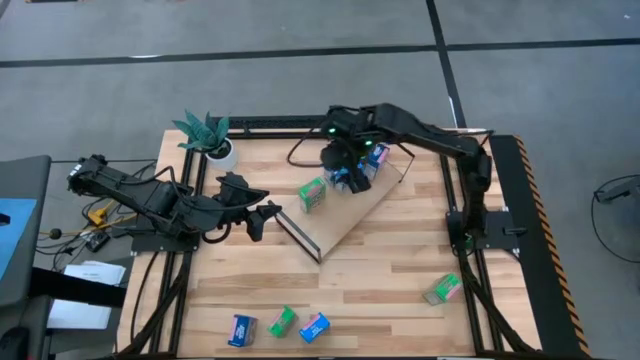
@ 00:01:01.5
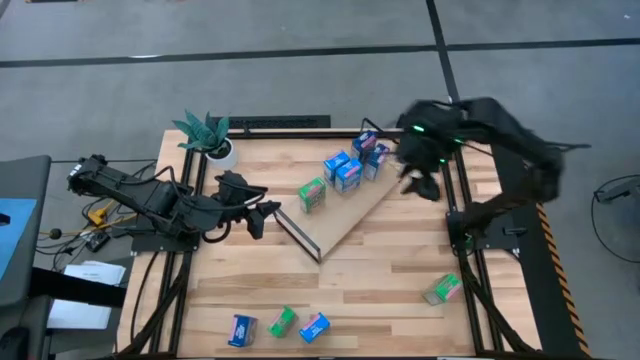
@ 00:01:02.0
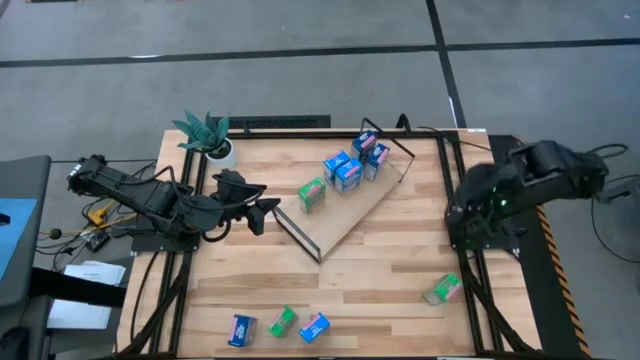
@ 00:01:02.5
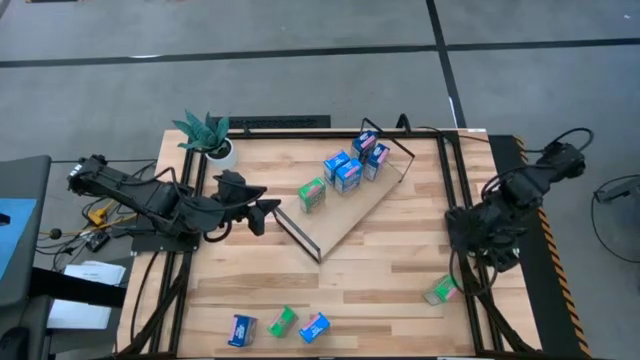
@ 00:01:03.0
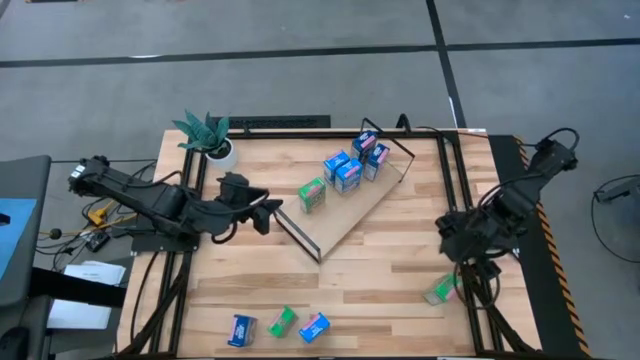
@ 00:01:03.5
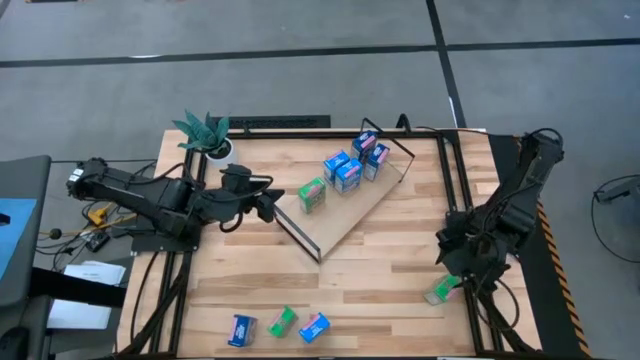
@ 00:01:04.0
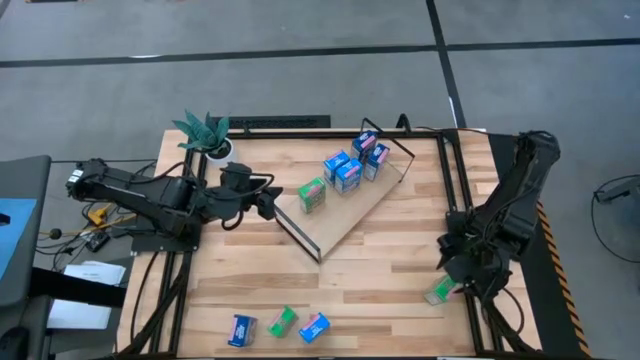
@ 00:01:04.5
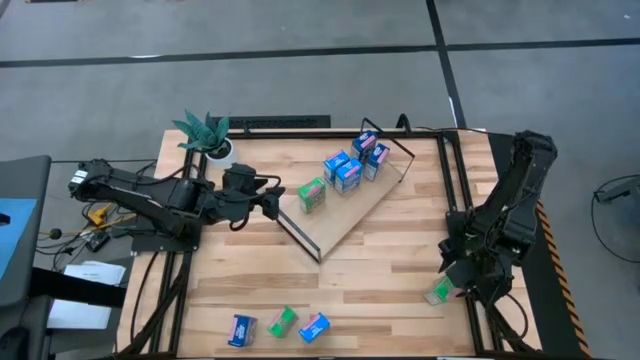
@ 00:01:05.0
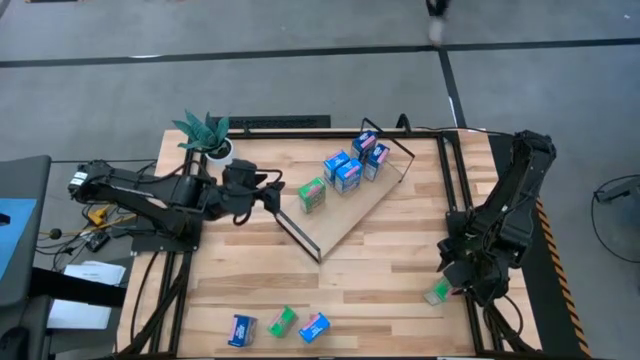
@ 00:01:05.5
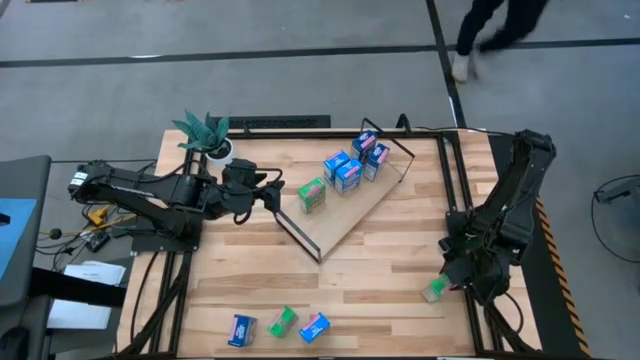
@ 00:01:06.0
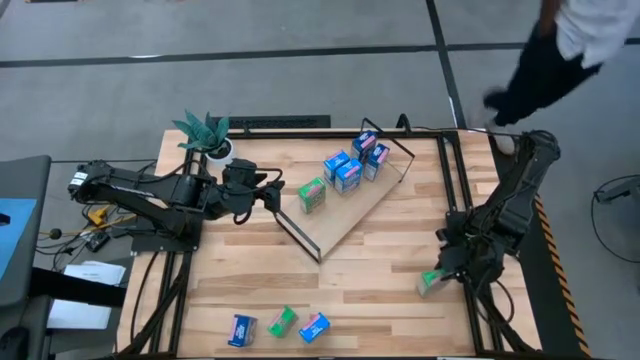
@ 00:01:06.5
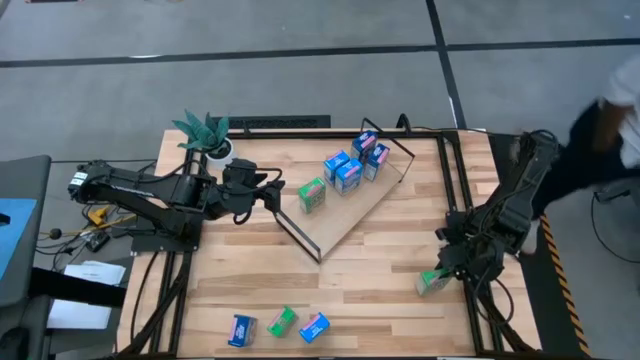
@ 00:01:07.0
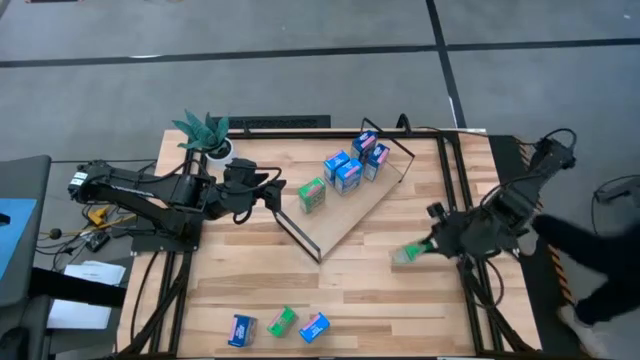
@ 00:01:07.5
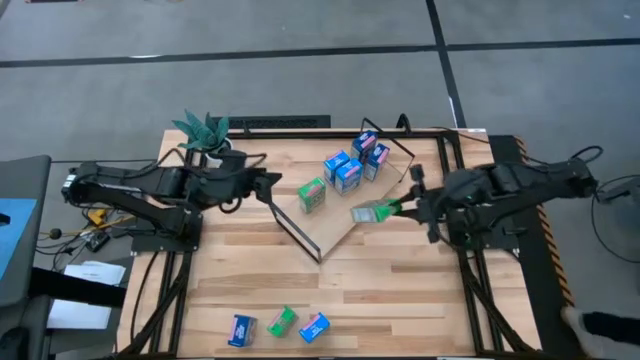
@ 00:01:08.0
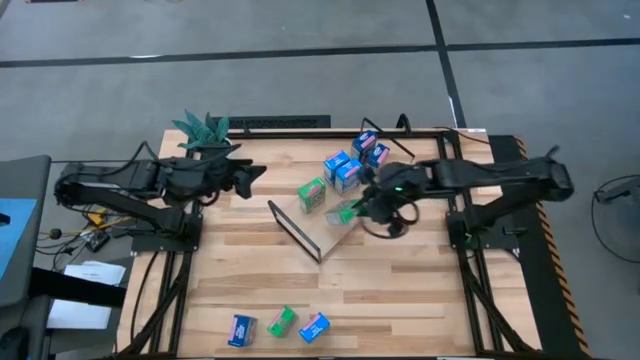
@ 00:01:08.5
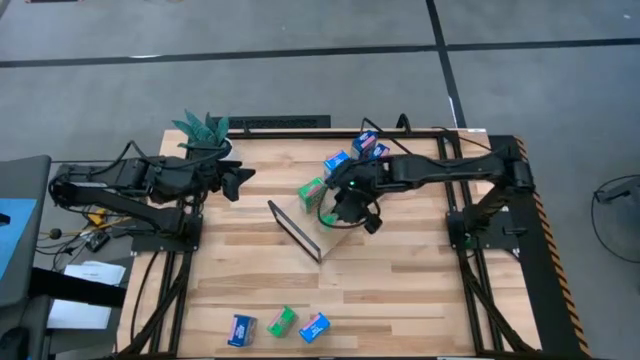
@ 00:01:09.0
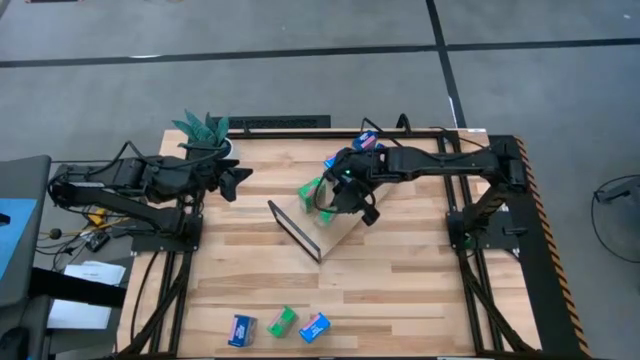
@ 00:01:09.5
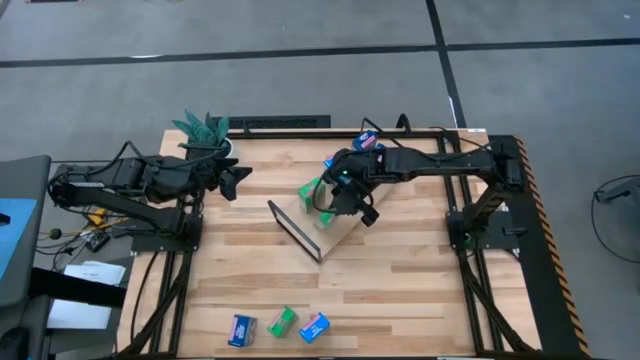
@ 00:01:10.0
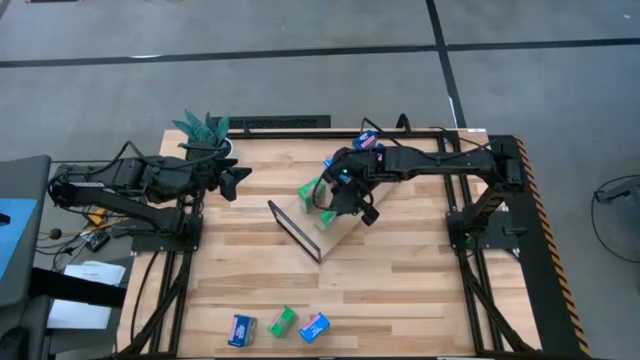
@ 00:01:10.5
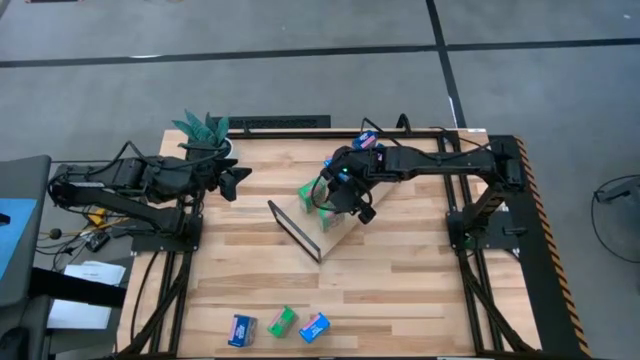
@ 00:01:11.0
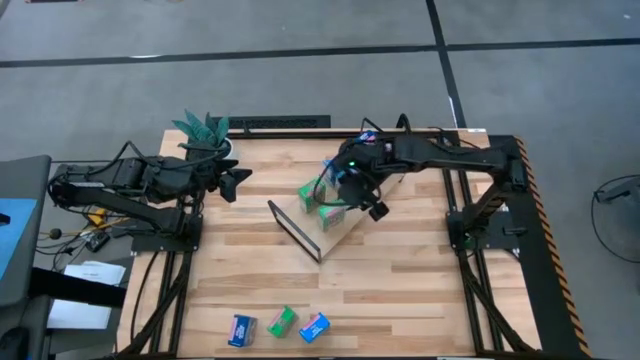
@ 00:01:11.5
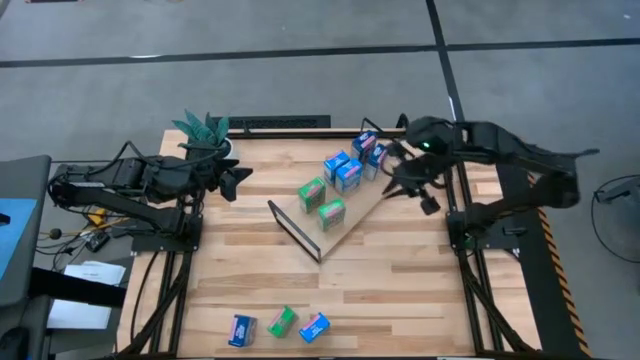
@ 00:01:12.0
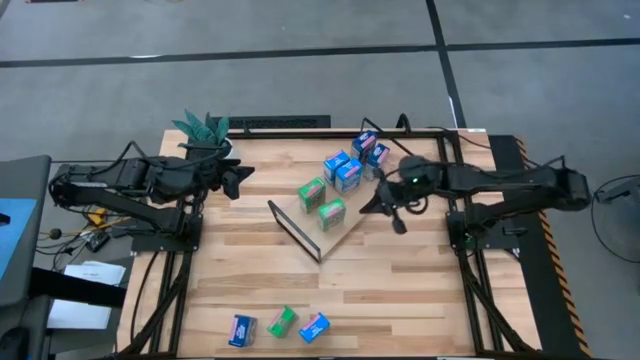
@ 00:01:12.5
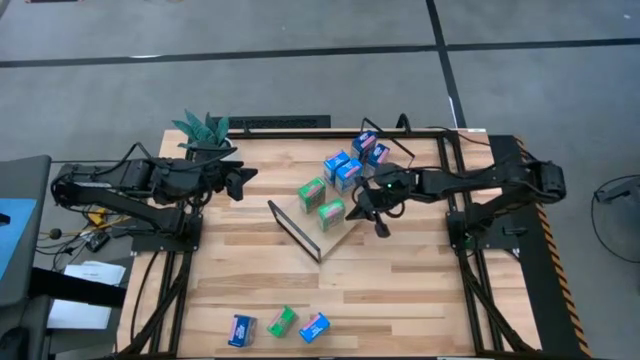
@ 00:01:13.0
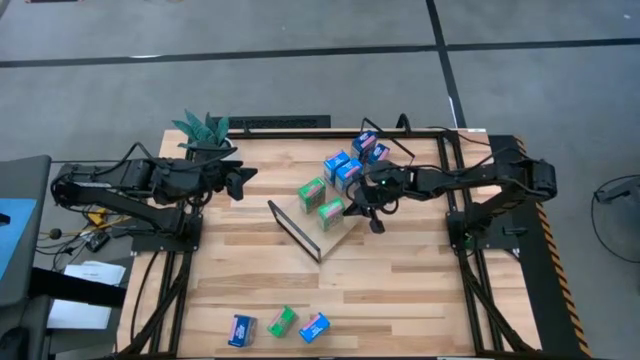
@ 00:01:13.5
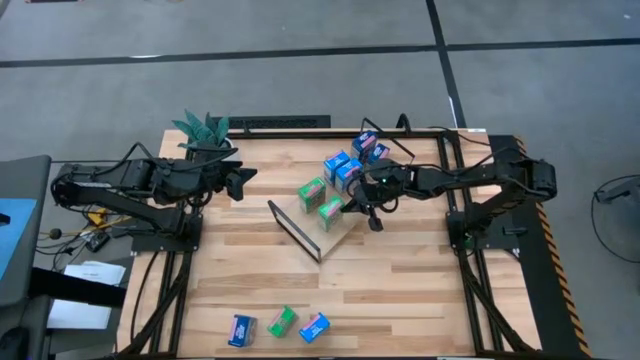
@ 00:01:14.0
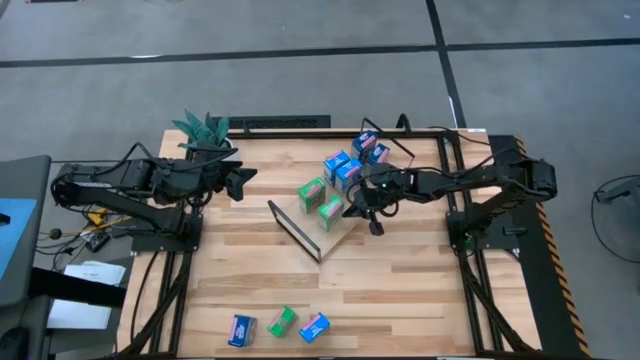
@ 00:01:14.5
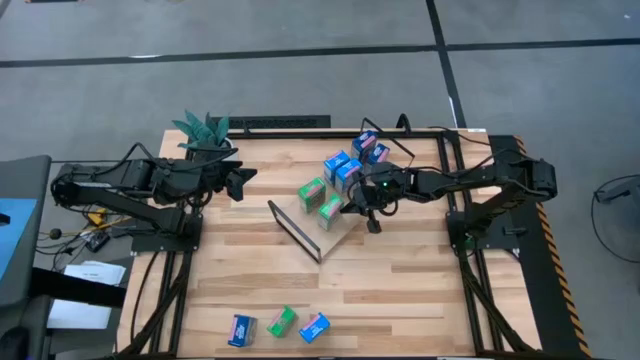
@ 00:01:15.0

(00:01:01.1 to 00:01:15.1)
Task: Stack cereal on shelf
Put the right green cereal box on the shelf aligned with the green cereal box

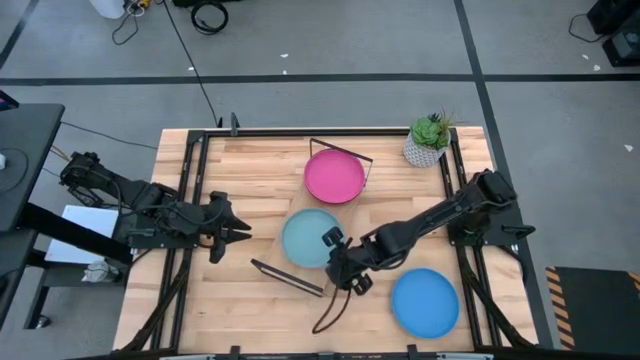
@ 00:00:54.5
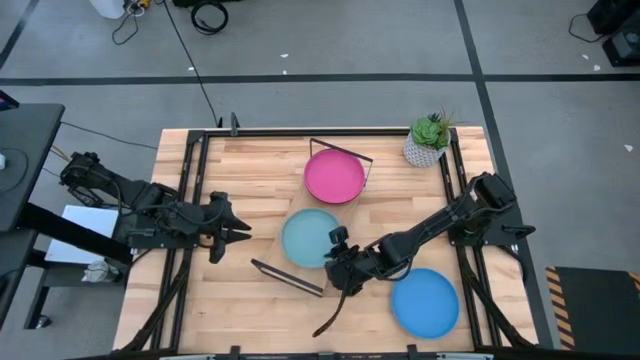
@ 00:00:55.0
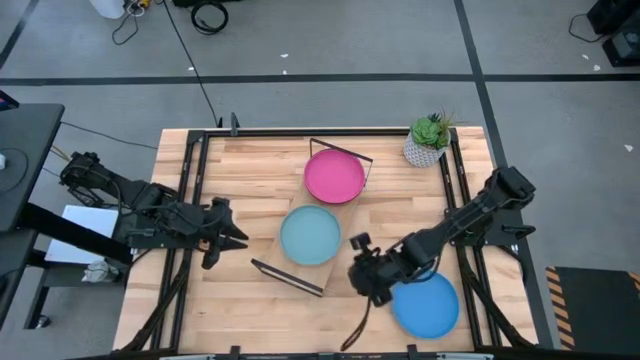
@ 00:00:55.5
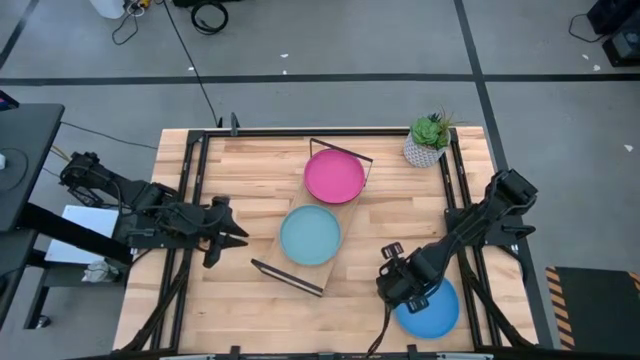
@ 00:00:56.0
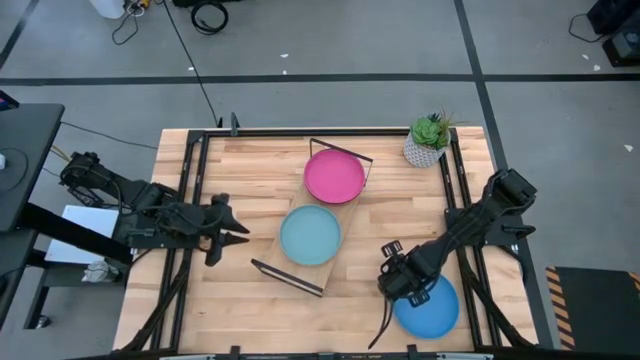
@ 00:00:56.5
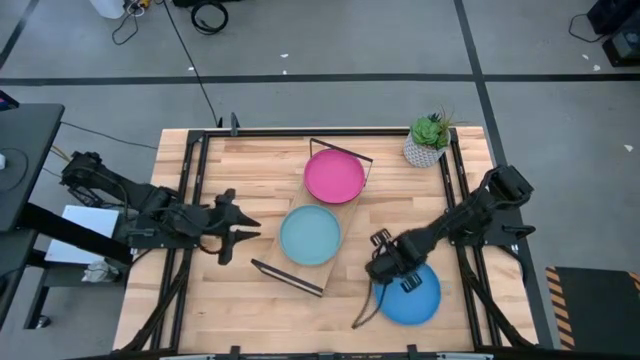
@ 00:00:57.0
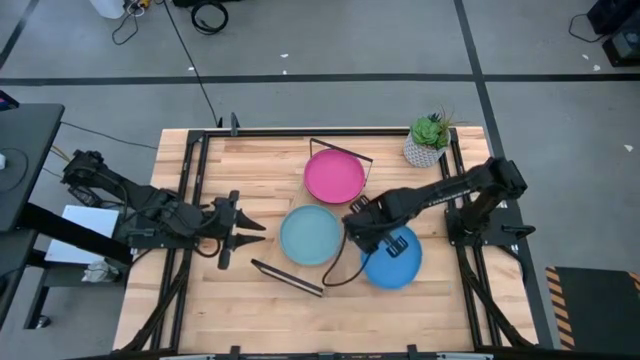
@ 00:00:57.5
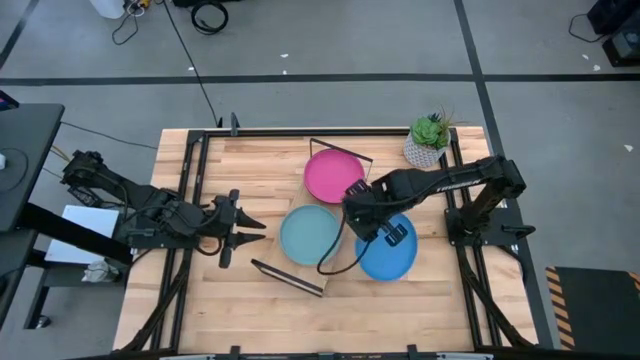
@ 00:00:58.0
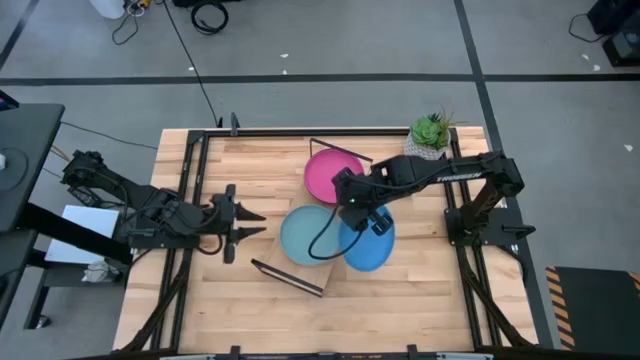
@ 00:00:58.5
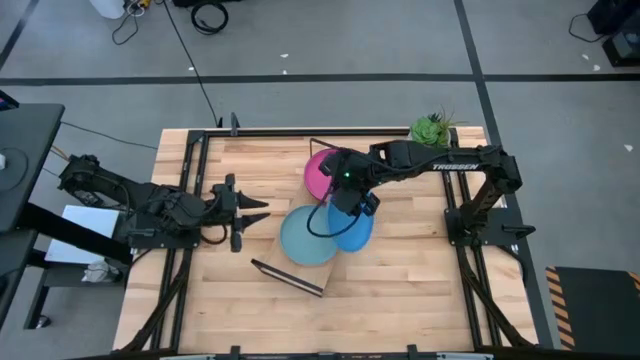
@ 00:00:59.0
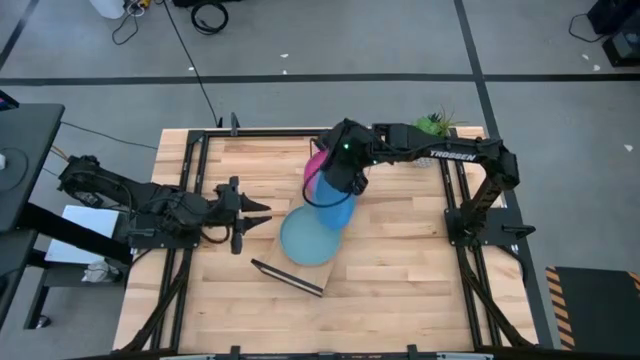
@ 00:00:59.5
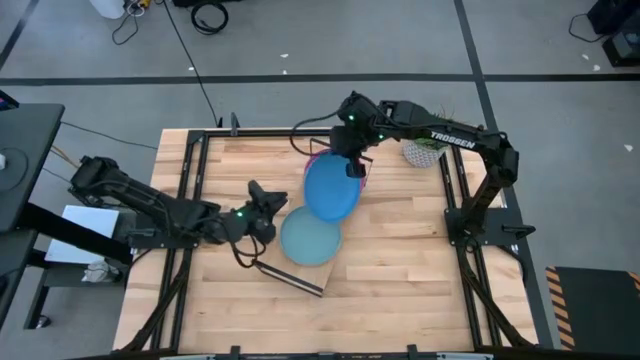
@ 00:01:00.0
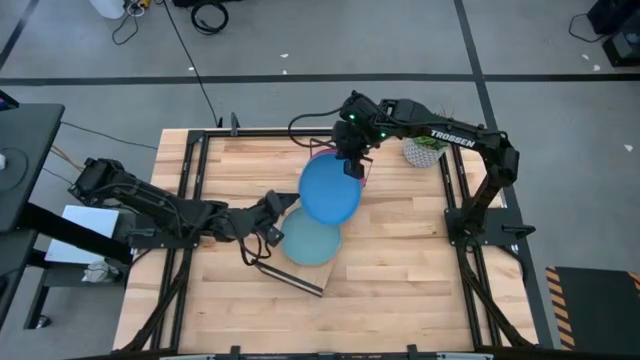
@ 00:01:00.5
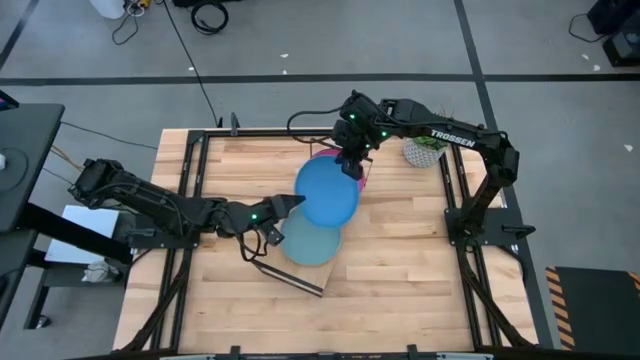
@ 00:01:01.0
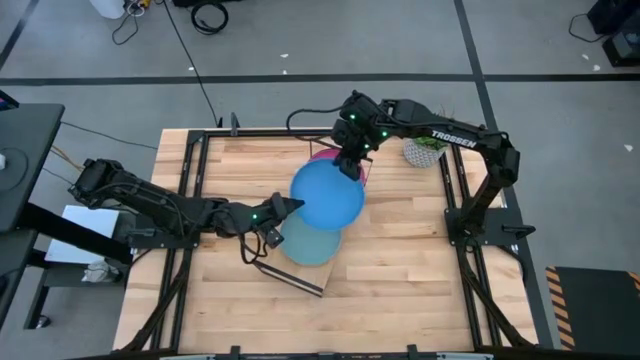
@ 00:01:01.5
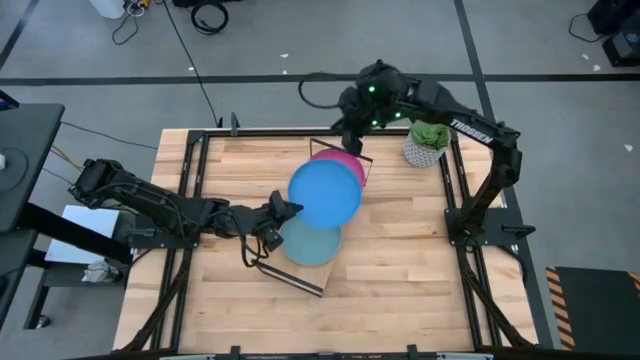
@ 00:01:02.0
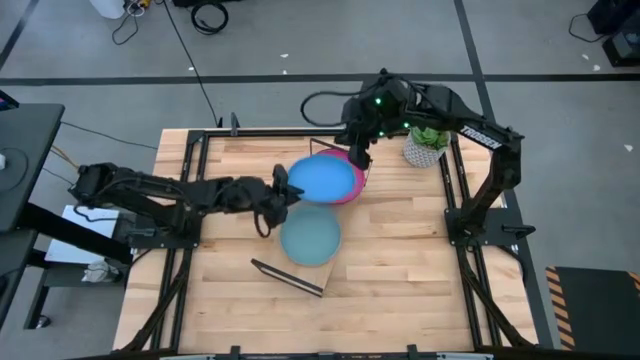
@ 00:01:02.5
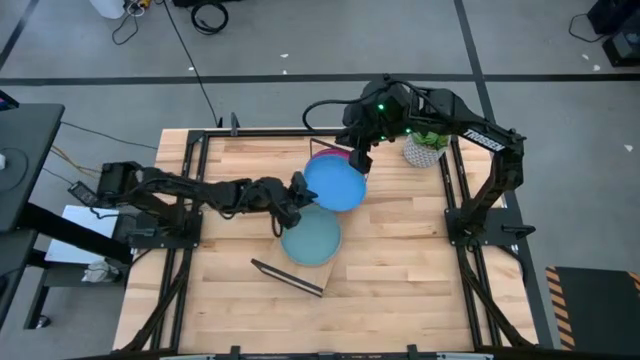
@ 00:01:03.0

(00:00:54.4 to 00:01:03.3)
Task: Place and stack plates onto a shelf
Stack the blue plate on the pink plate
